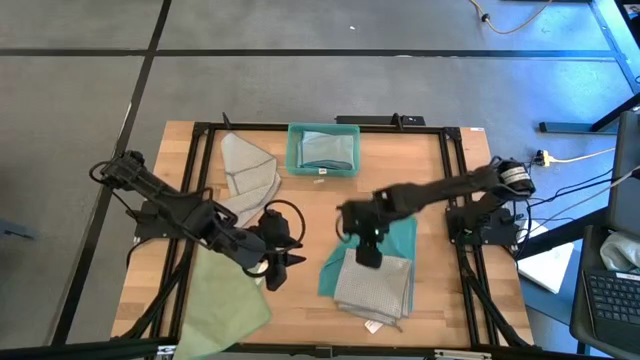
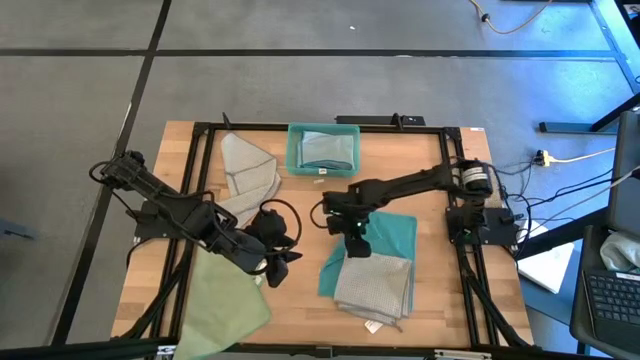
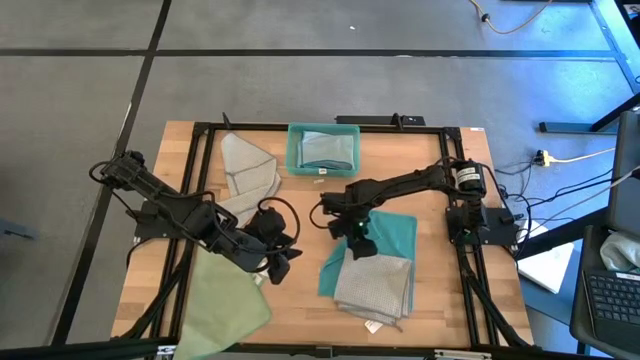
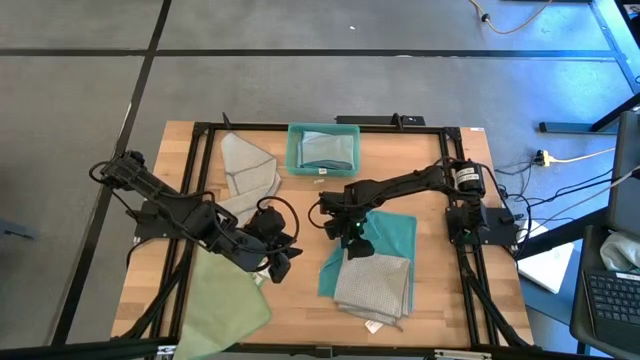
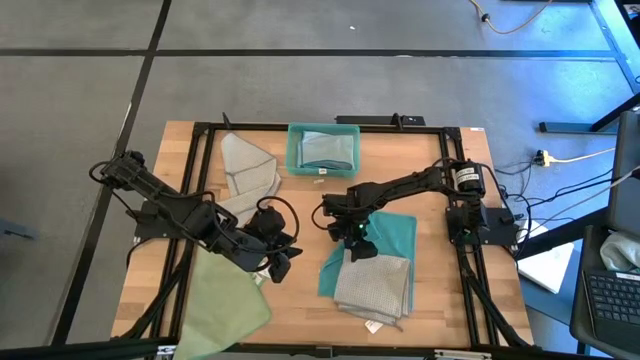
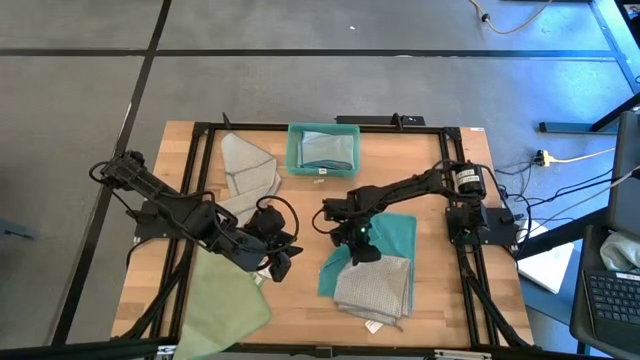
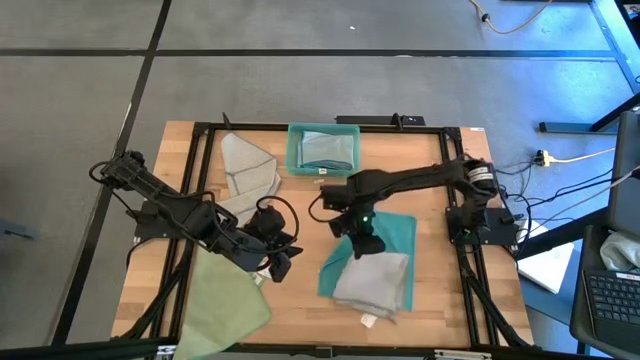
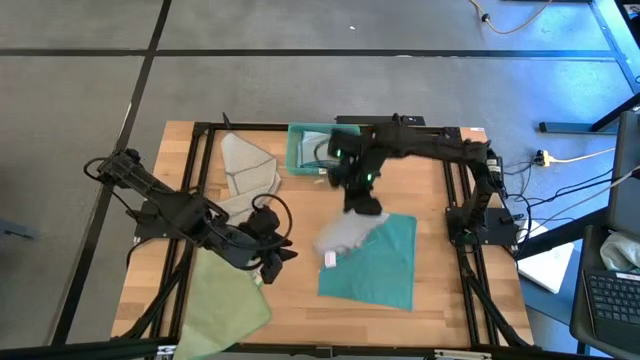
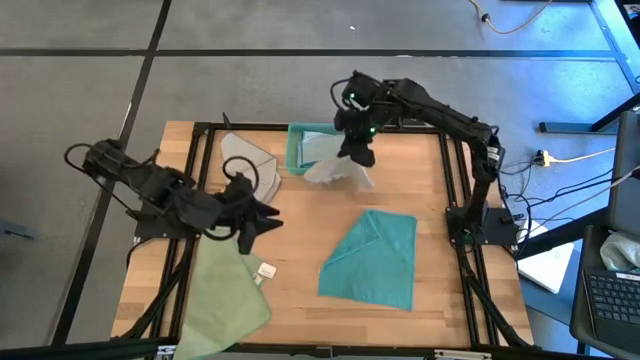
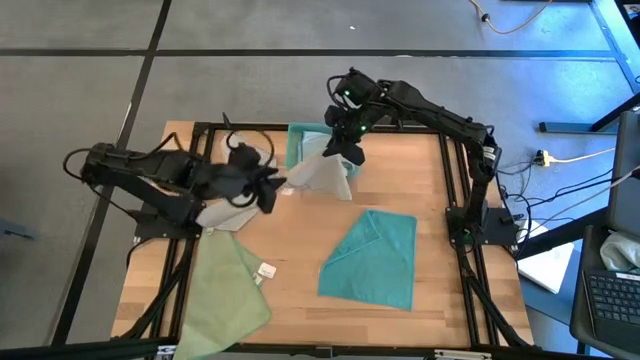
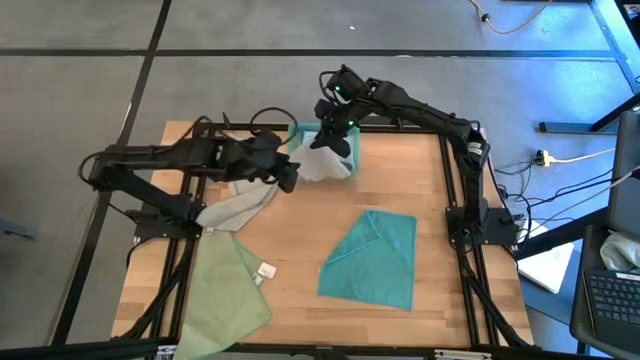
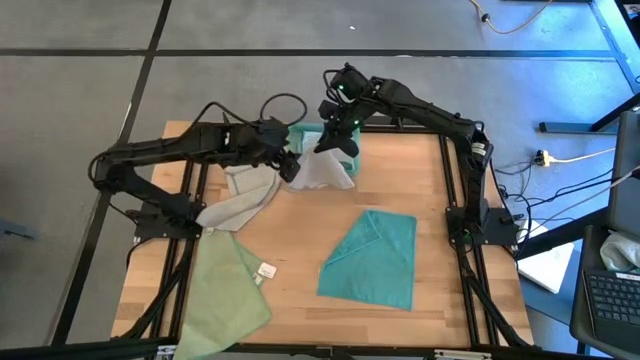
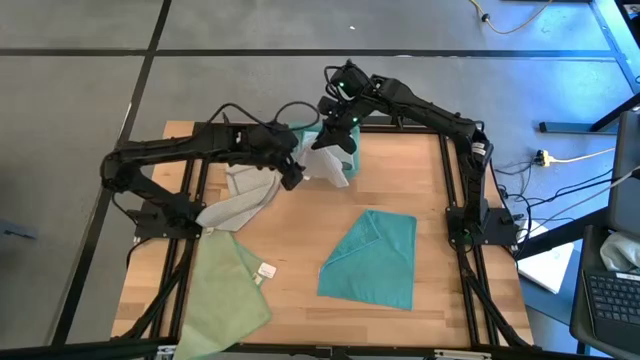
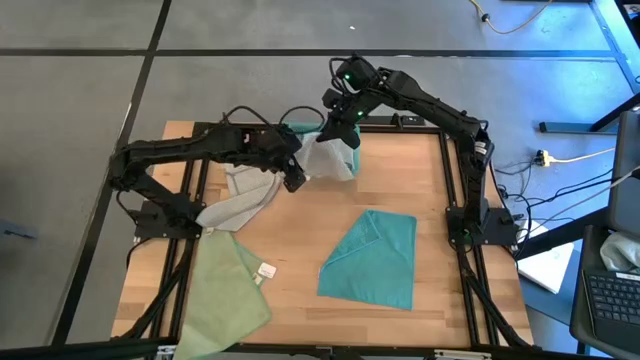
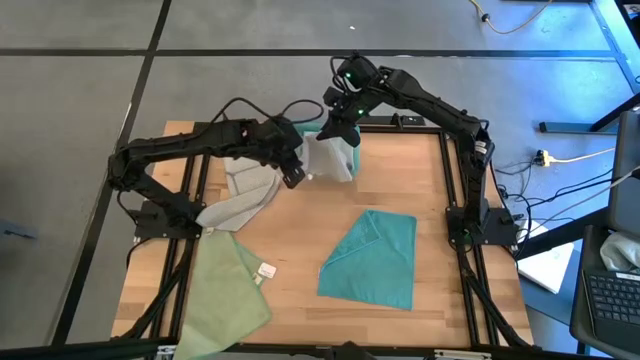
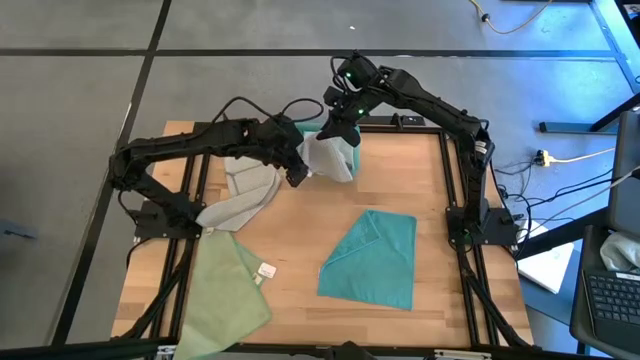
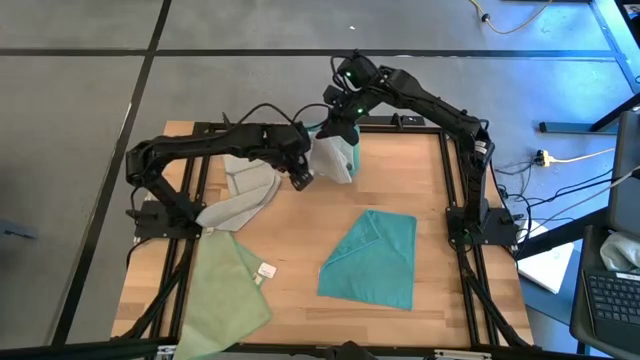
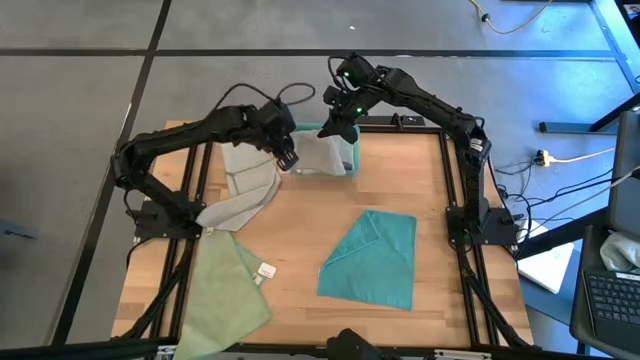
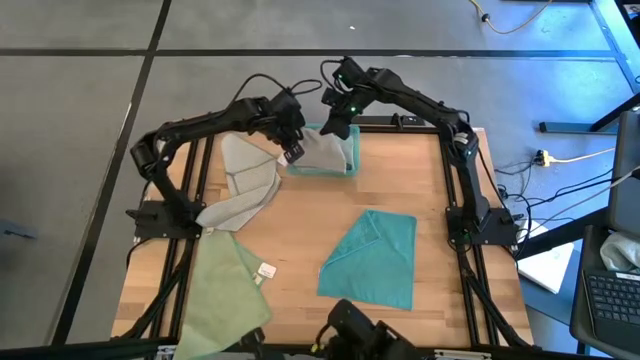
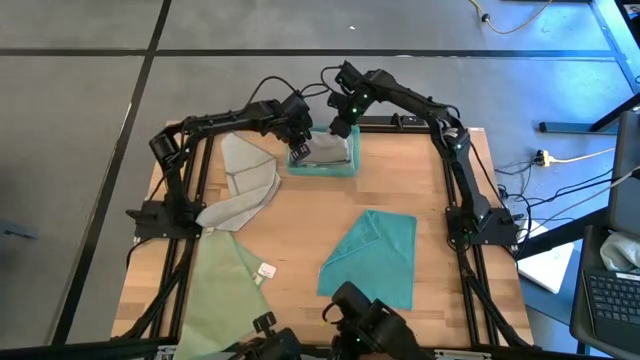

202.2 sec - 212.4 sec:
Task: Fold microfiber towels
Put the folded gray towel into the bin

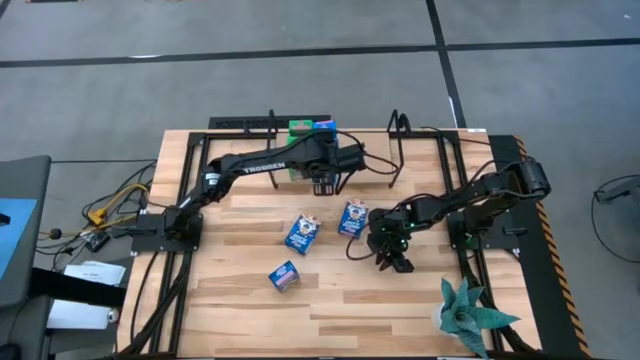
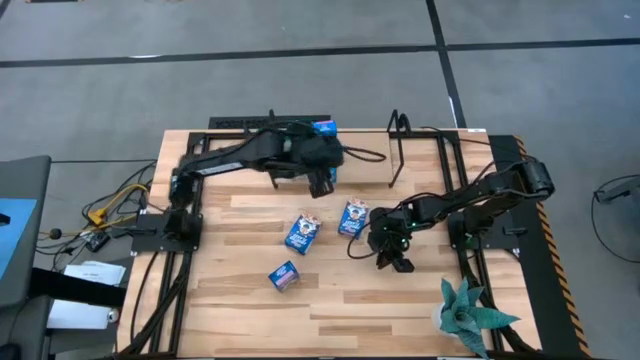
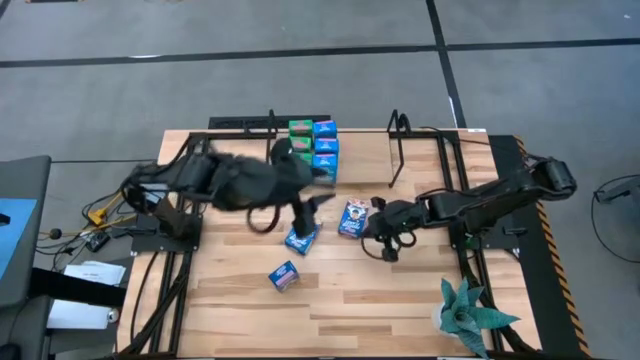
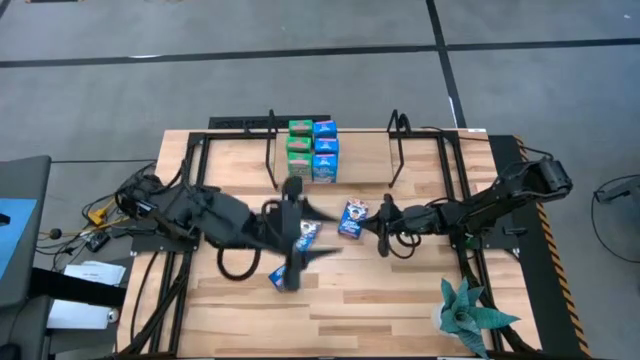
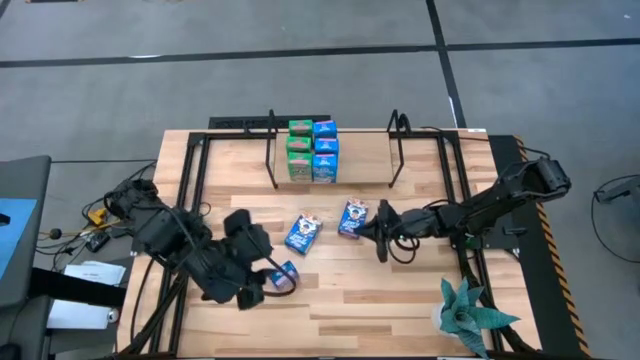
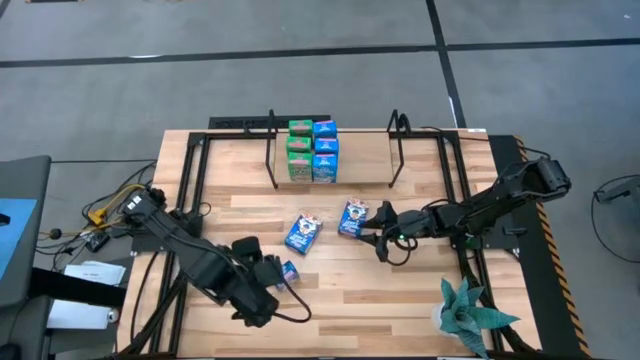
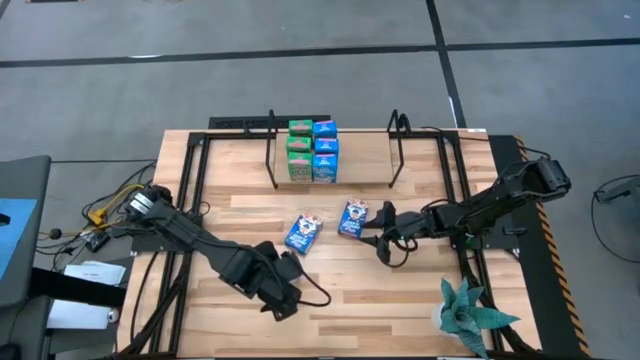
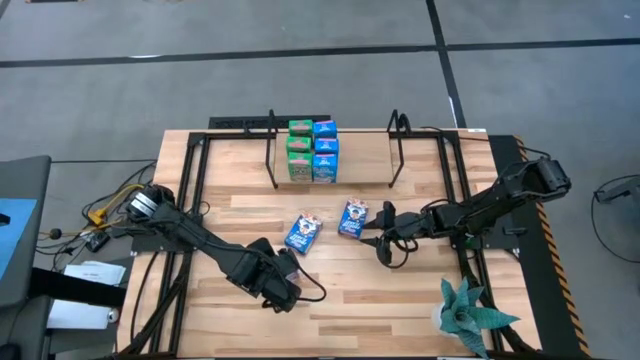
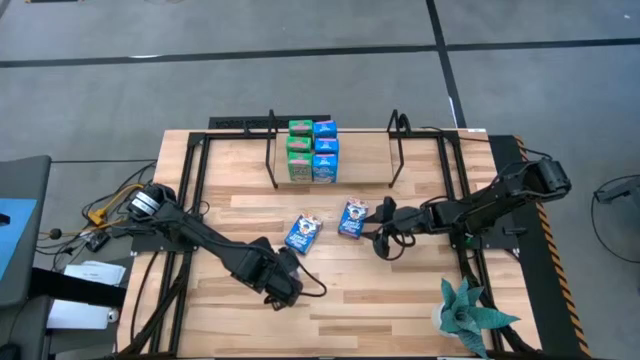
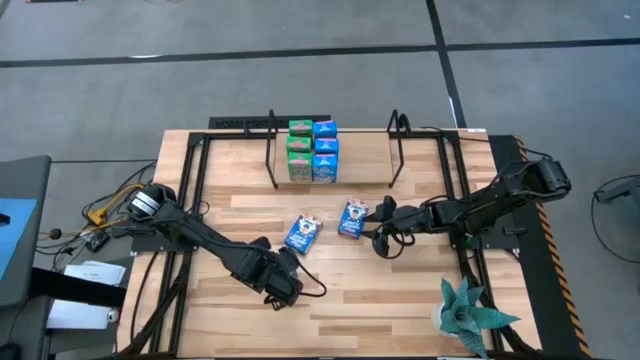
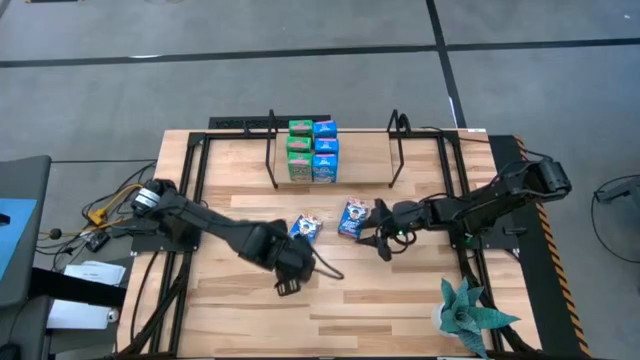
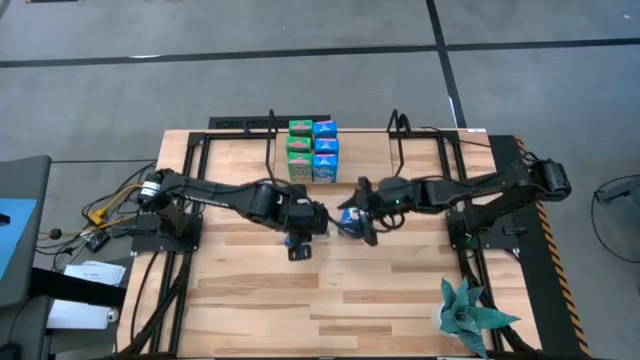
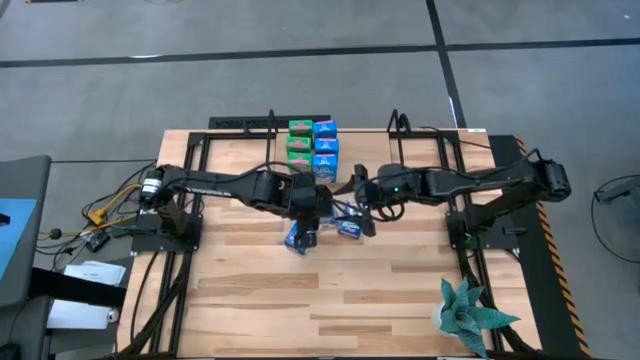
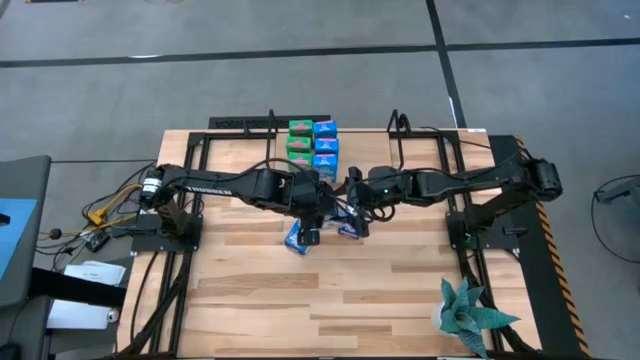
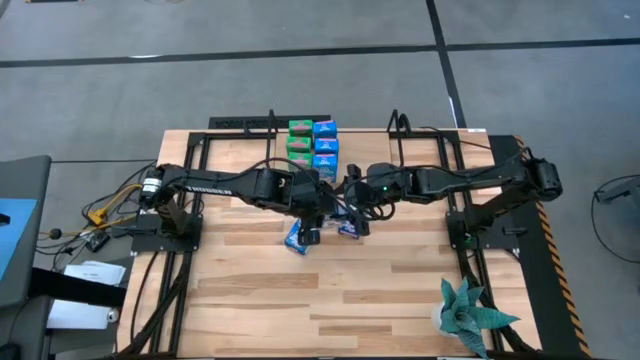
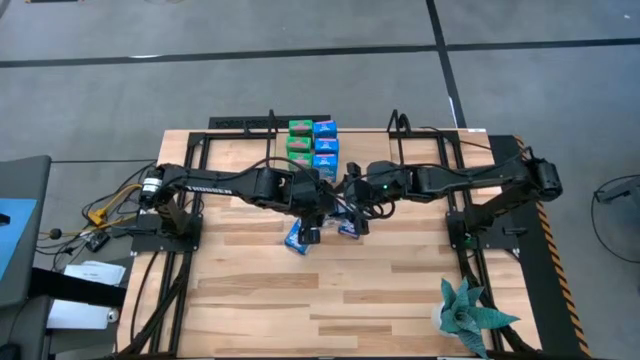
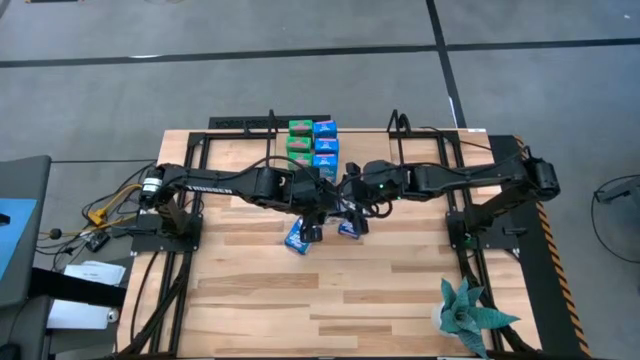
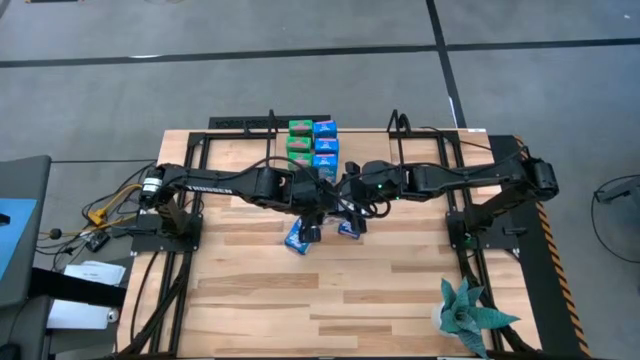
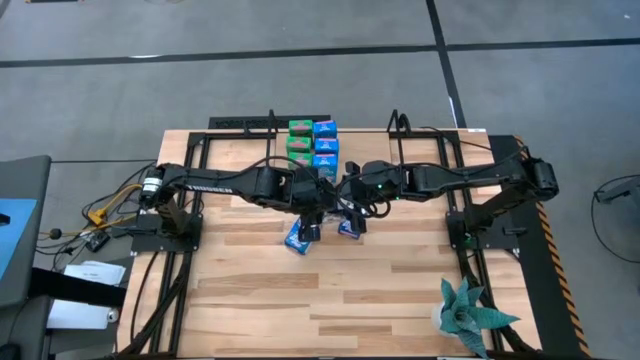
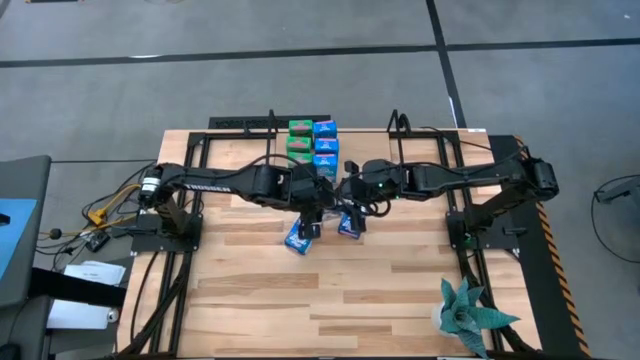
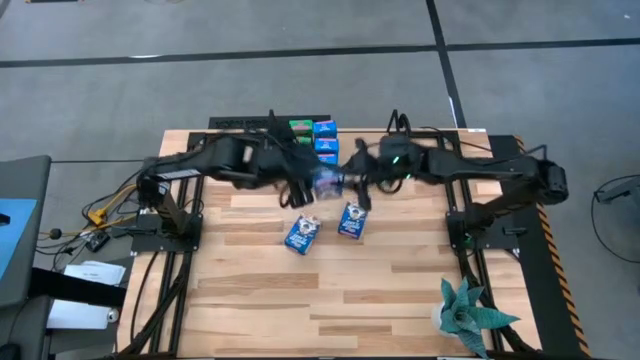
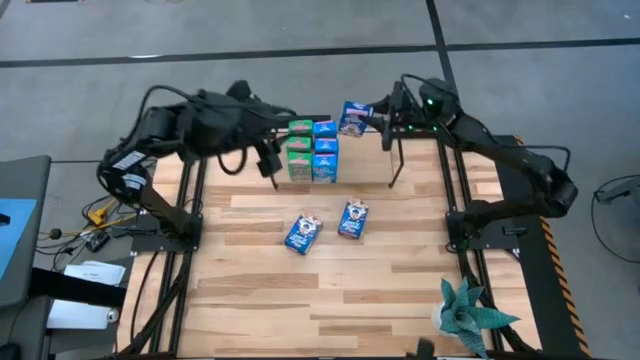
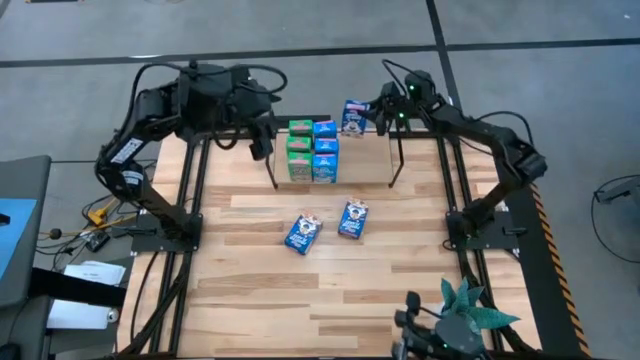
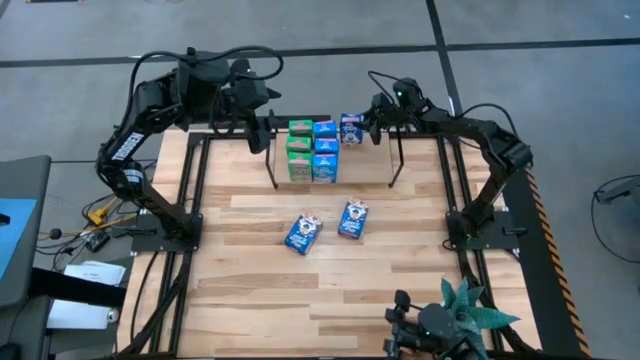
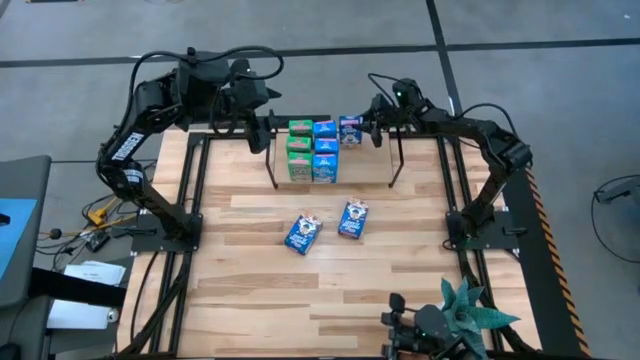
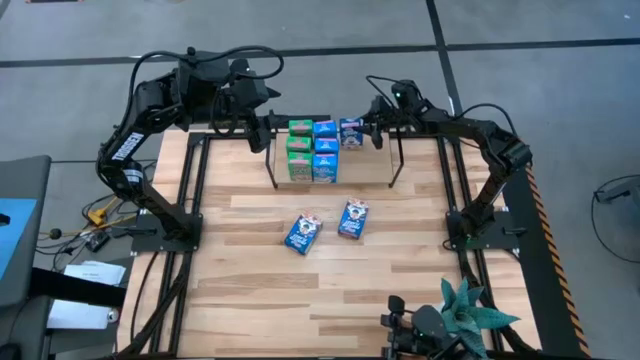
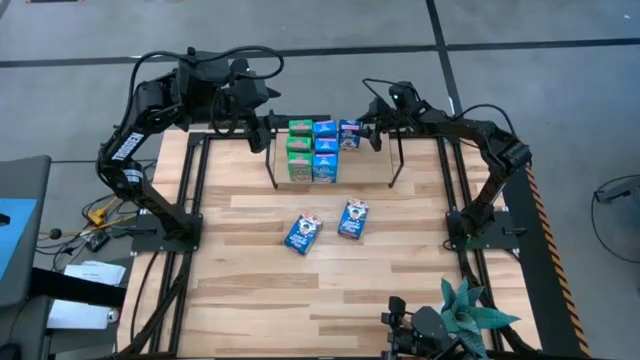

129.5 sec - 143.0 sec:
Task: Stack cereal on shelf
Put the bottom blue cereal box on the shelf aligned with the light blue cereal box
